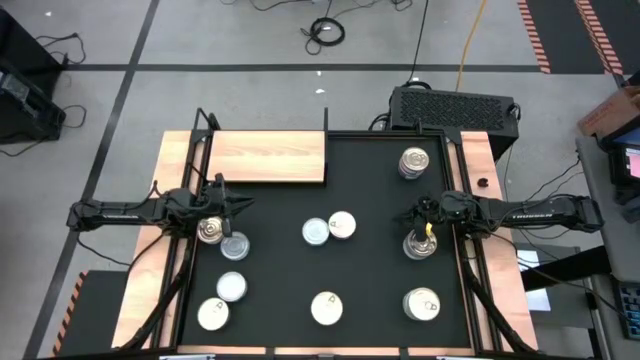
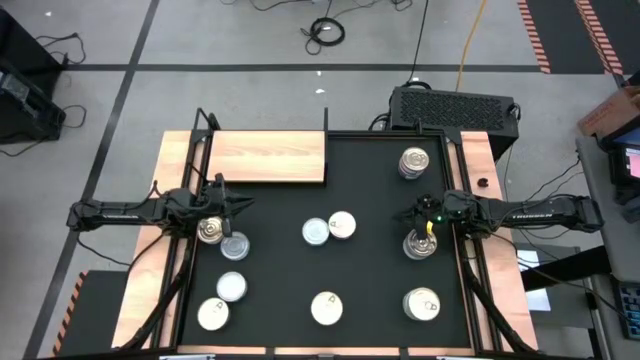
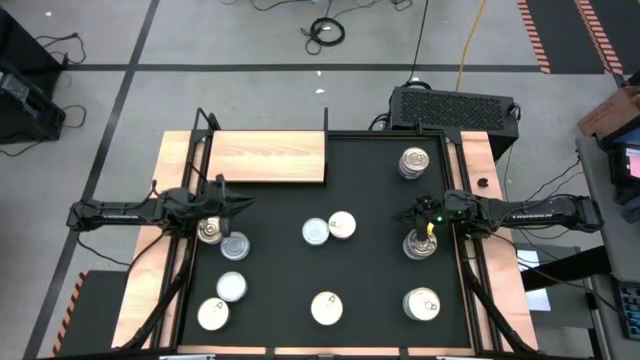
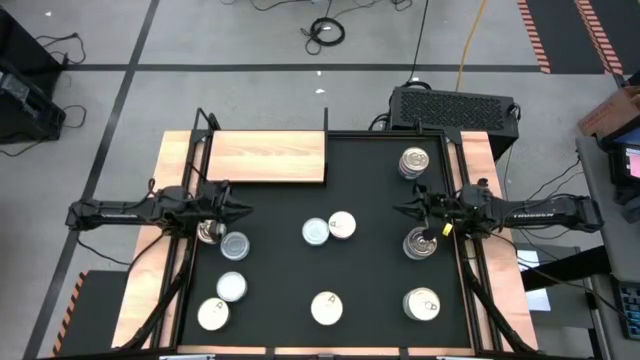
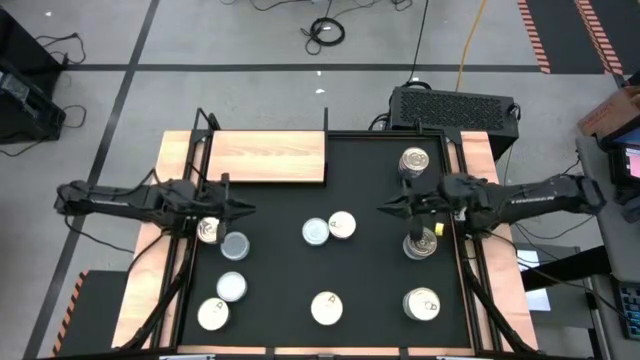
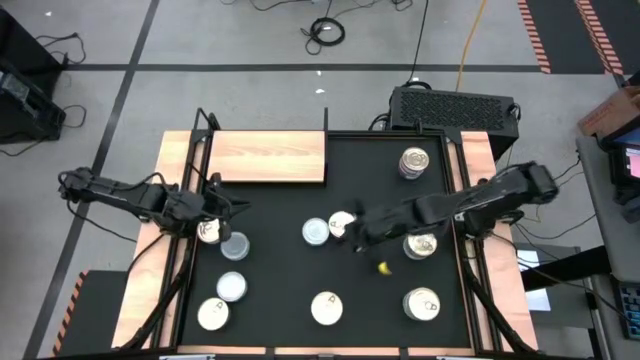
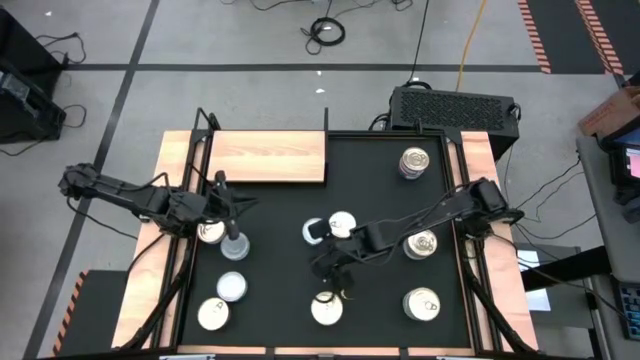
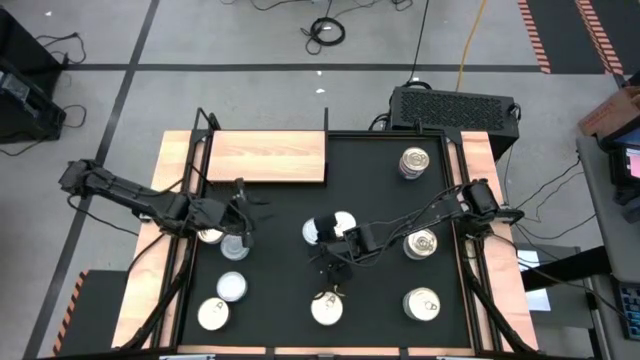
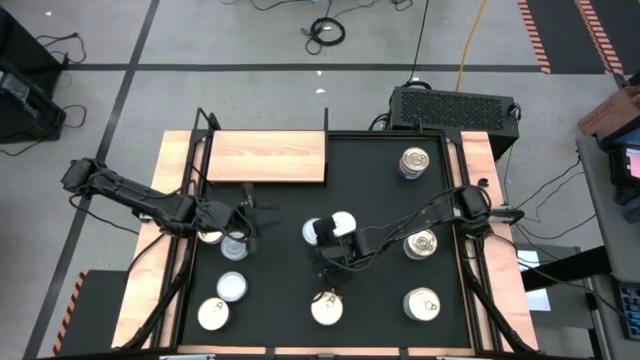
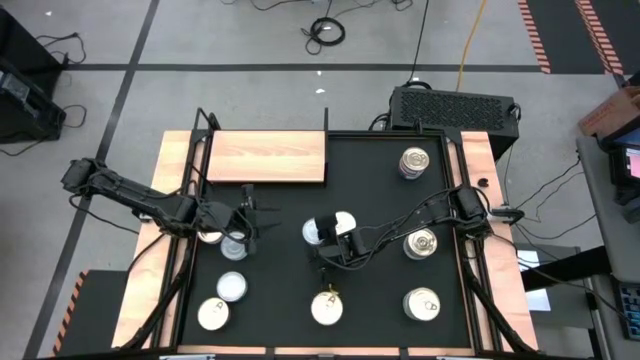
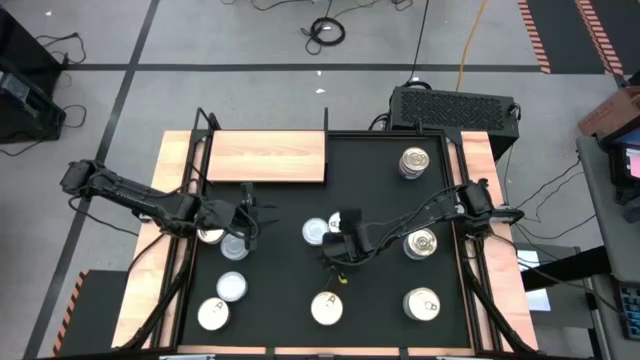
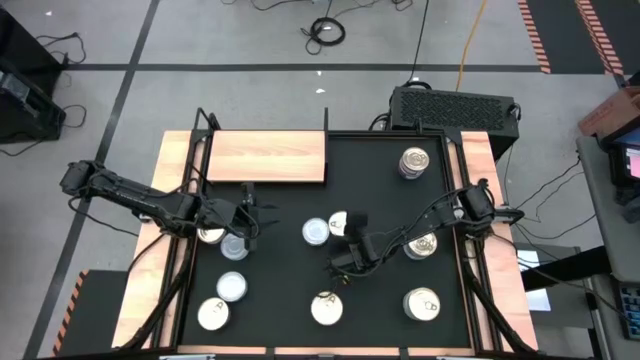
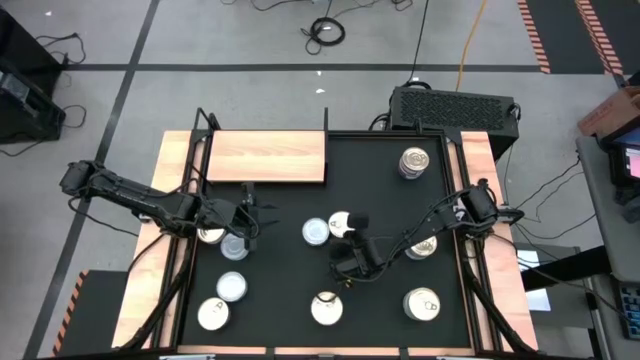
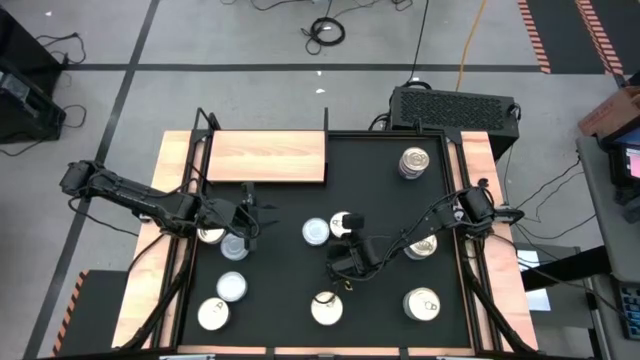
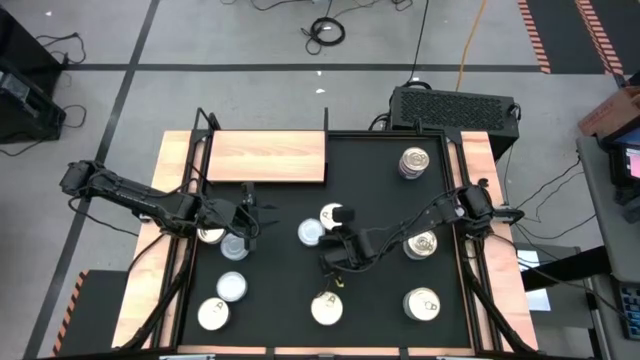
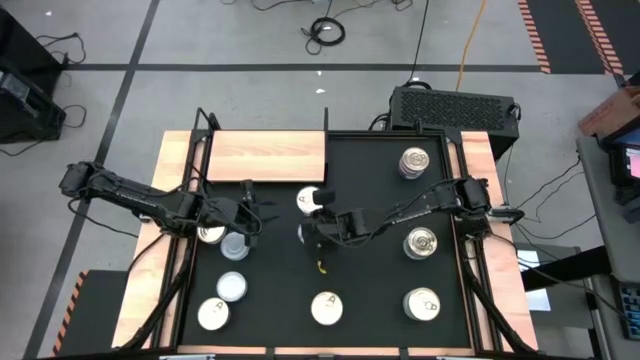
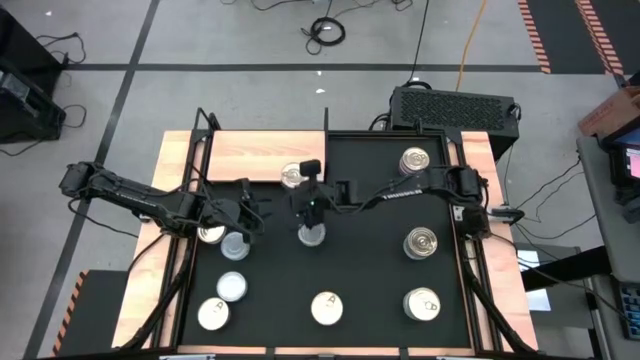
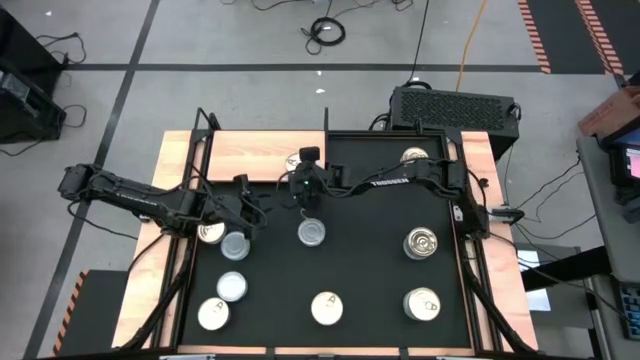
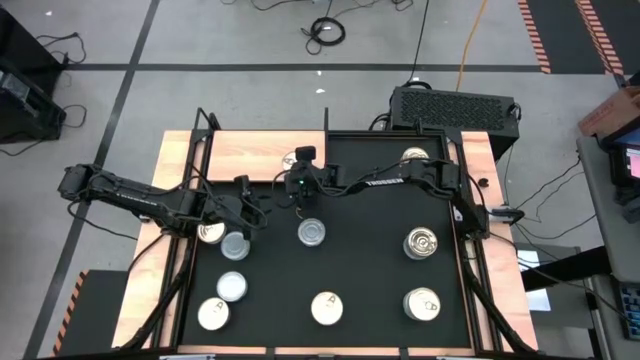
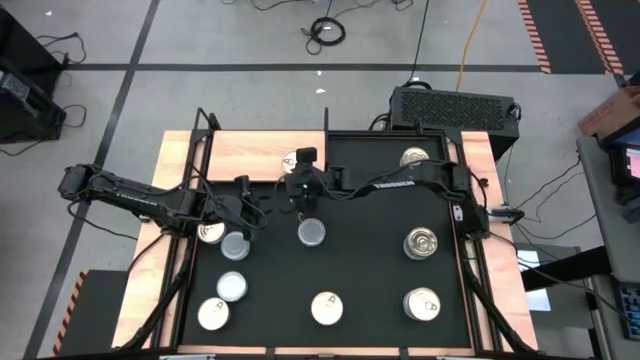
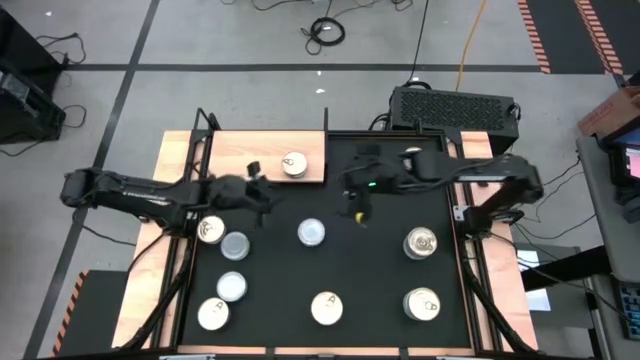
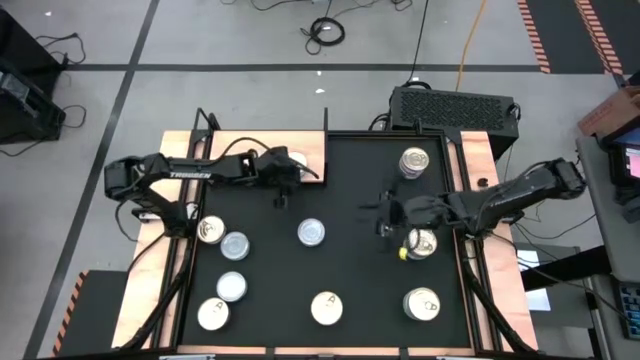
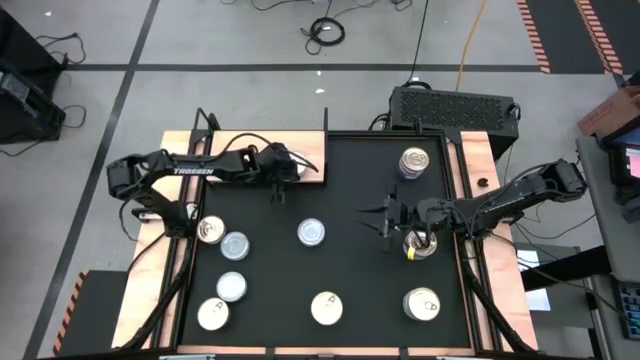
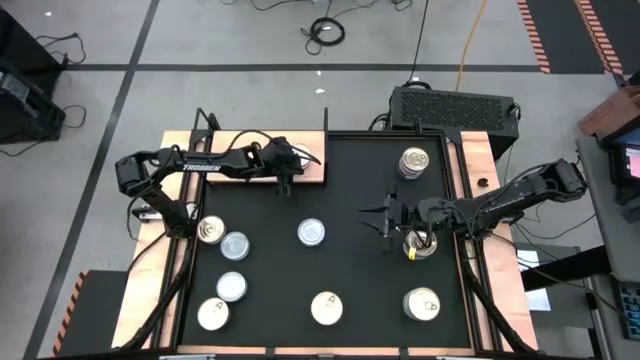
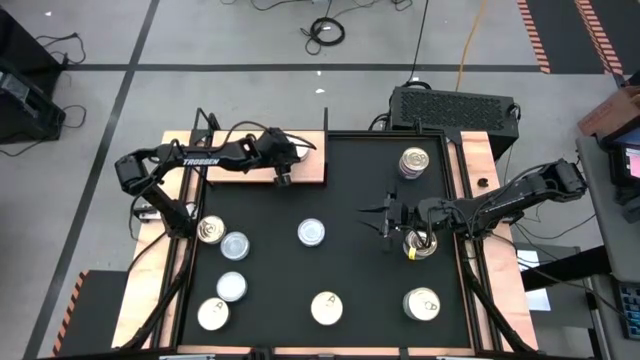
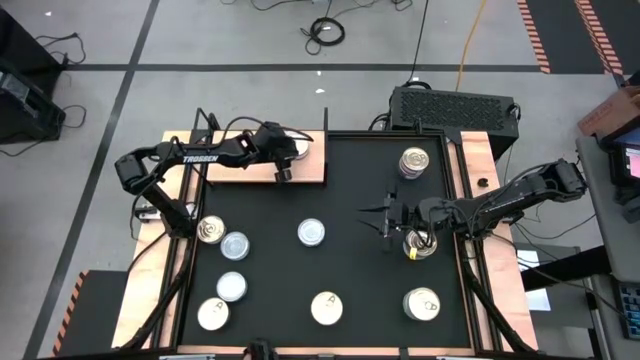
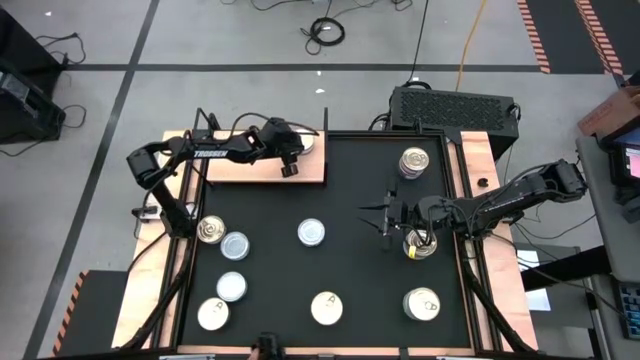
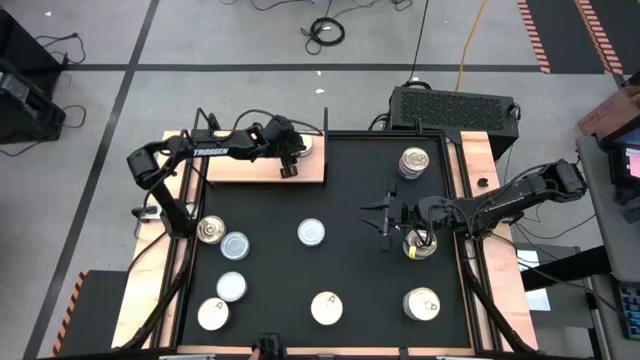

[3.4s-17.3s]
Task: Stack canned seafood by type on shelf
Put the blue-pink tuna can on the shelf

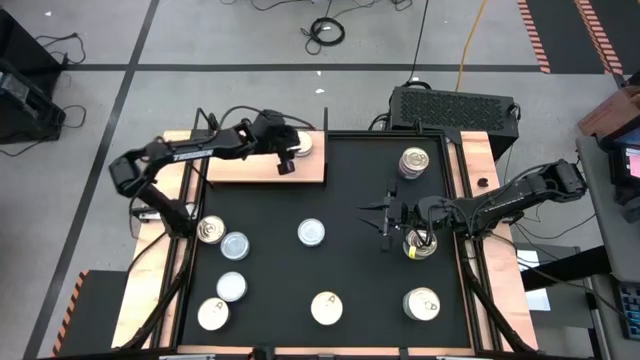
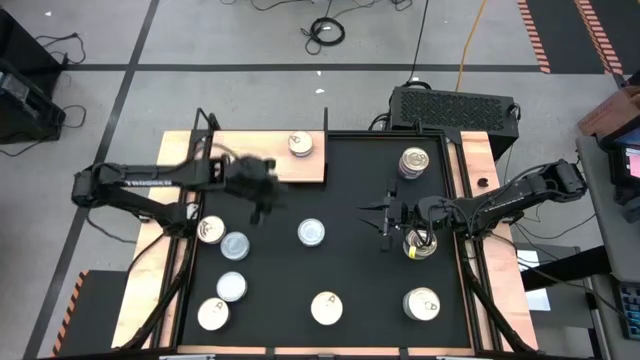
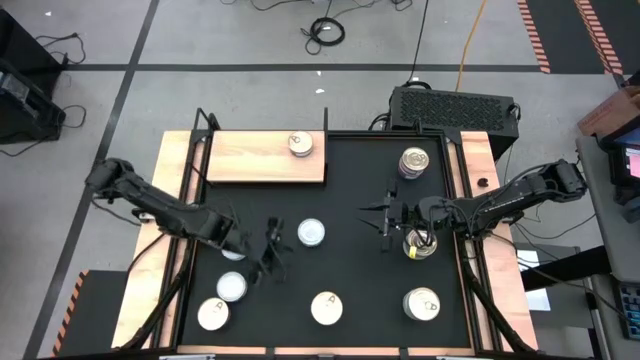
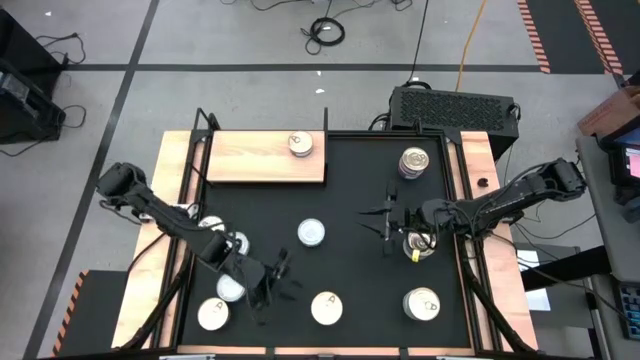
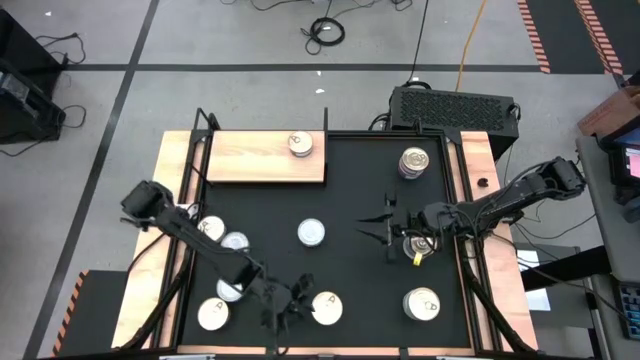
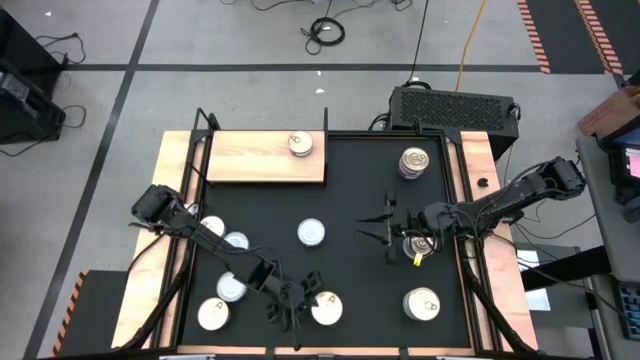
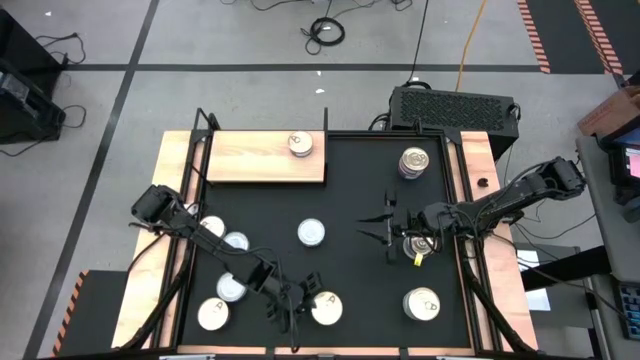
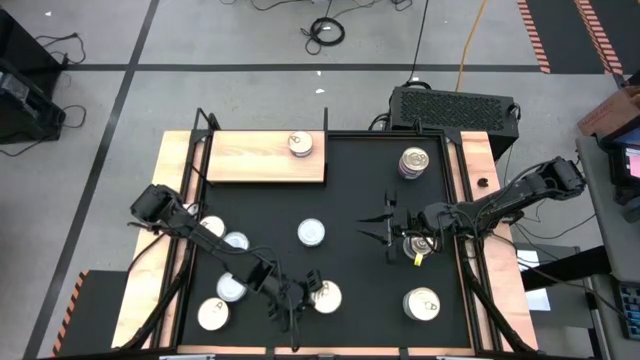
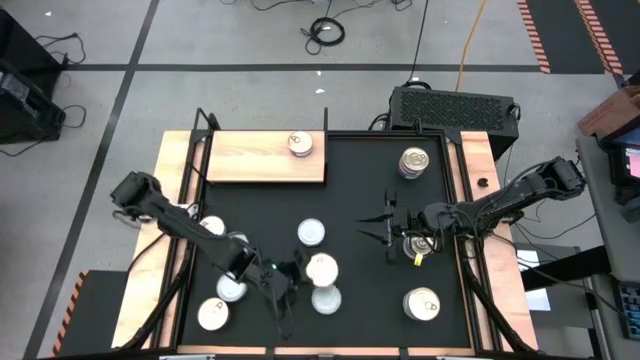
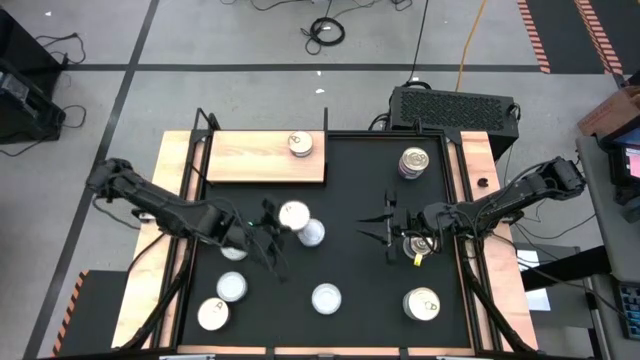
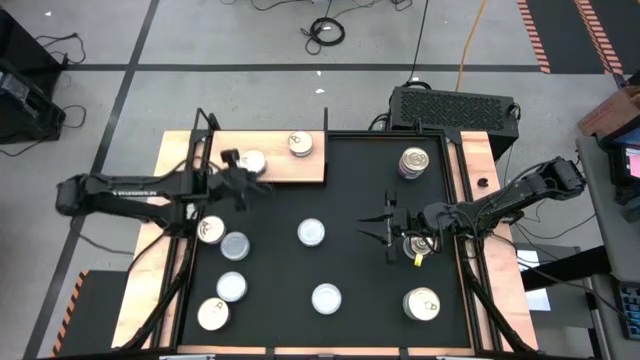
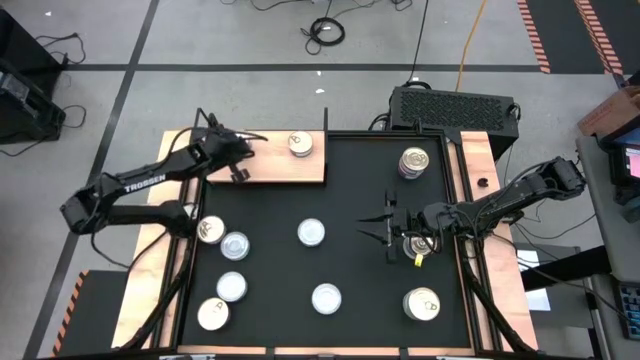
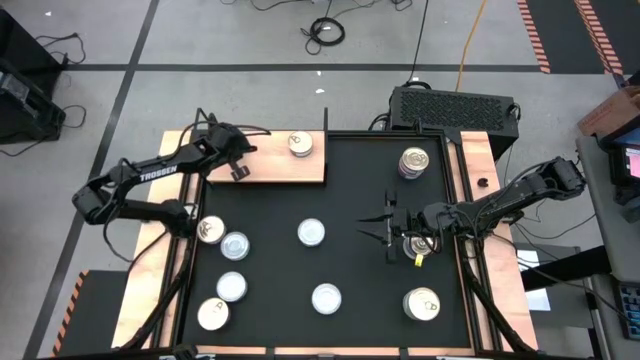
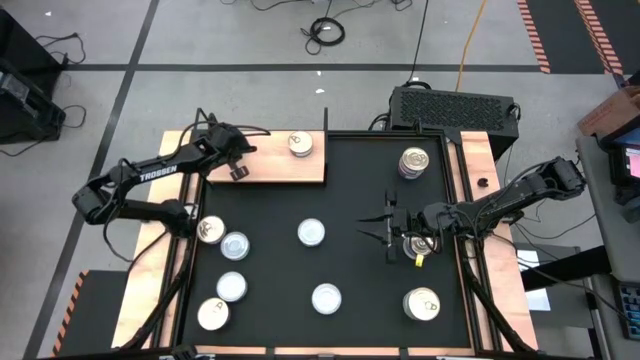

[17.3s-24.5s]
Put the blue-pink tuna can on the shelf

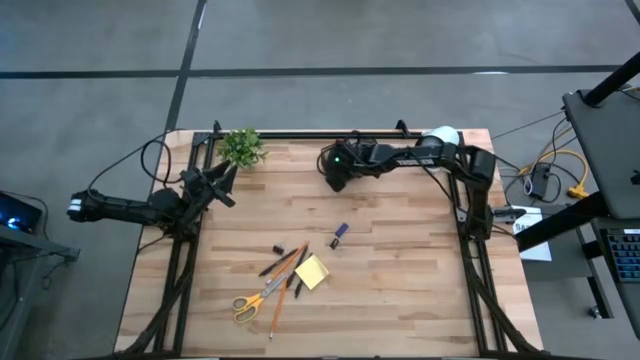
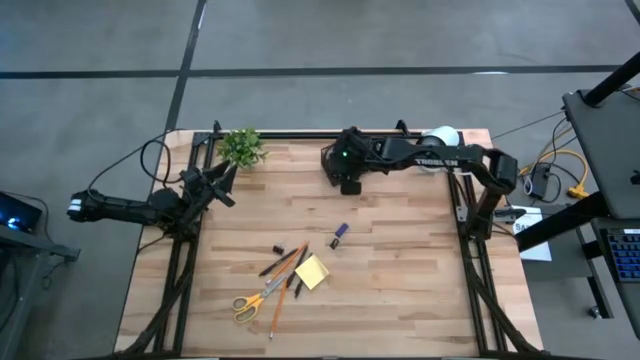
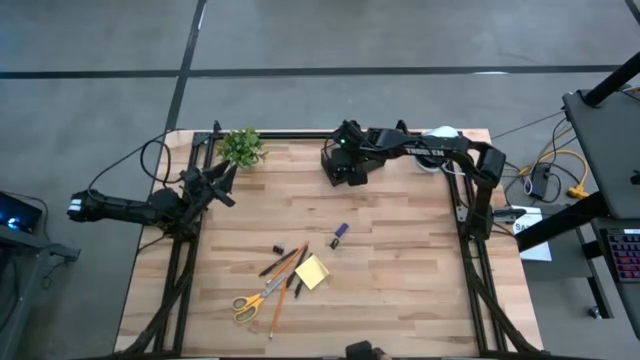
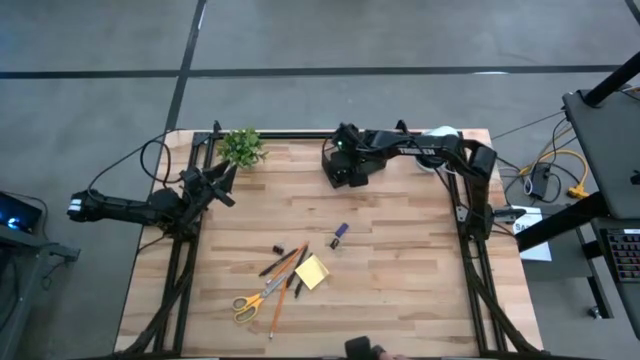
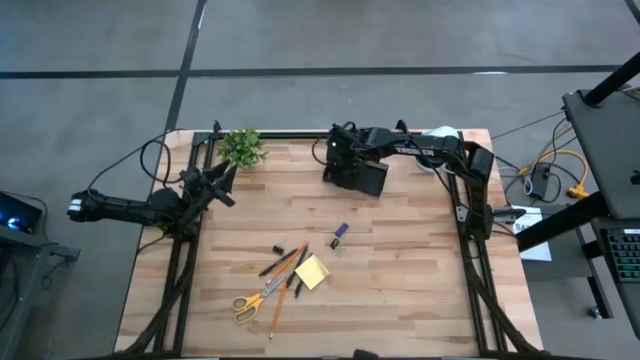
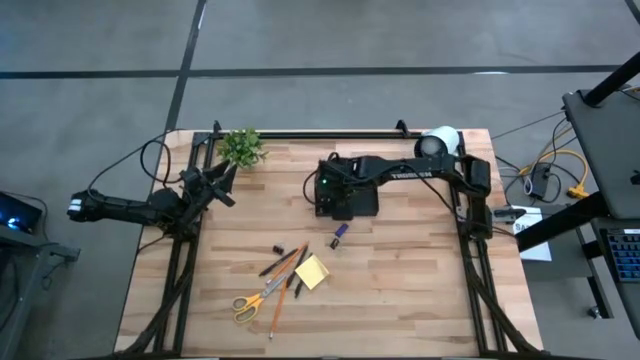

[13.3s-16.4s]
Task: Pick and place office supplies into organizer
Adjust the black desk organizer
